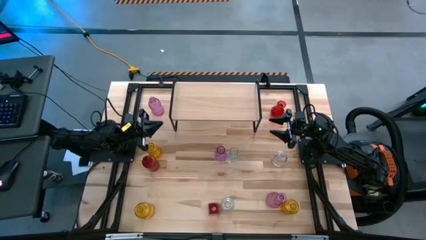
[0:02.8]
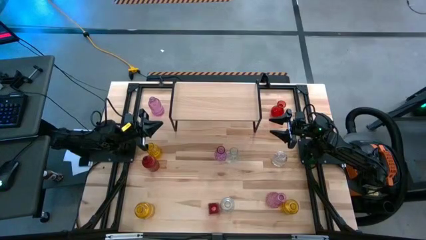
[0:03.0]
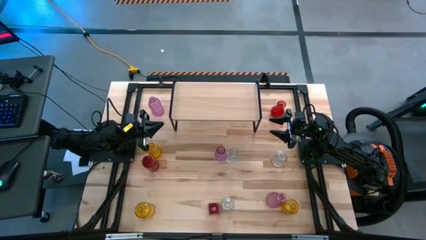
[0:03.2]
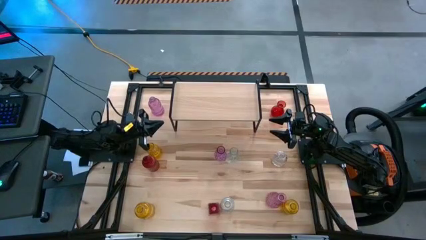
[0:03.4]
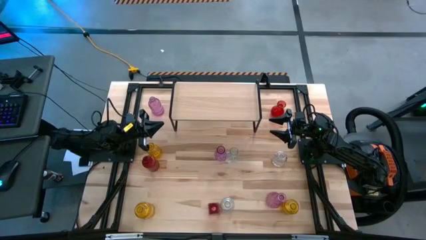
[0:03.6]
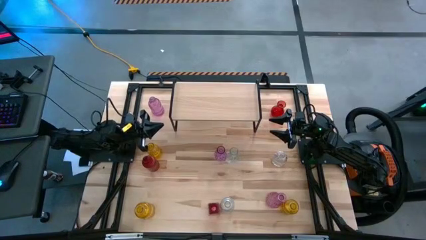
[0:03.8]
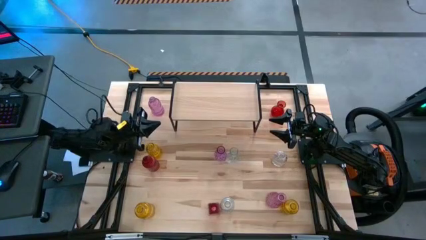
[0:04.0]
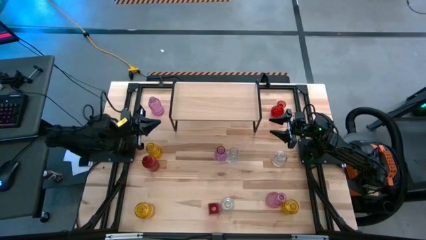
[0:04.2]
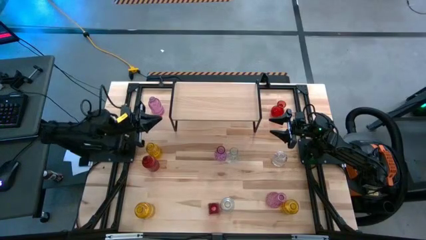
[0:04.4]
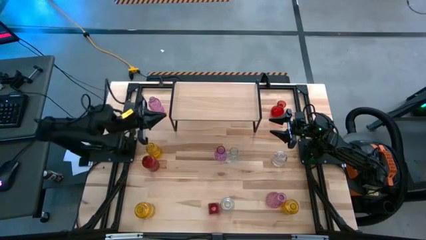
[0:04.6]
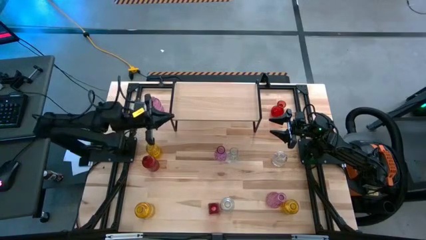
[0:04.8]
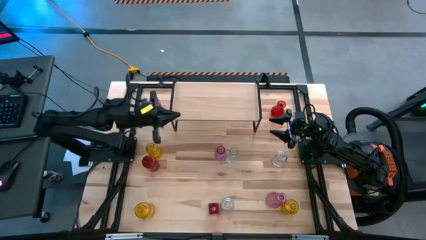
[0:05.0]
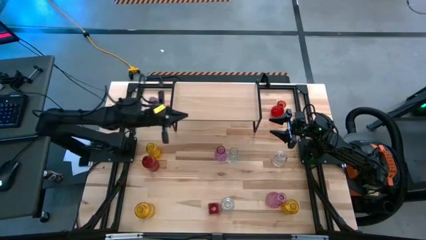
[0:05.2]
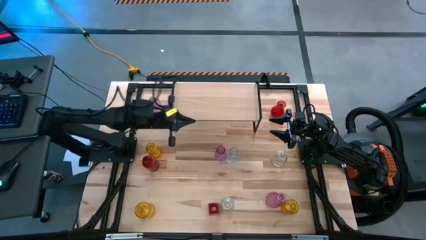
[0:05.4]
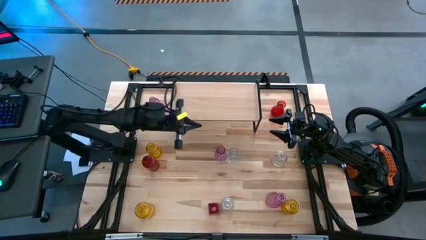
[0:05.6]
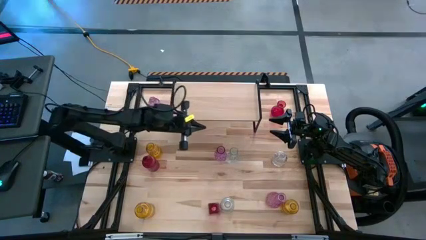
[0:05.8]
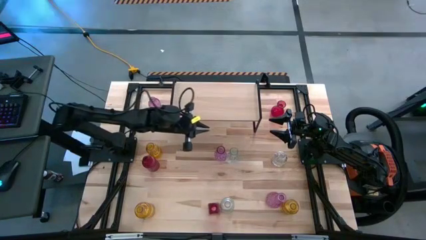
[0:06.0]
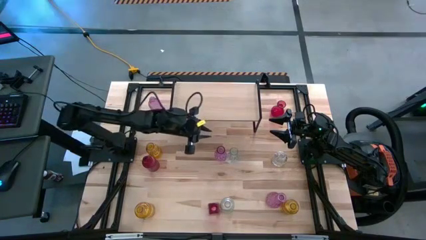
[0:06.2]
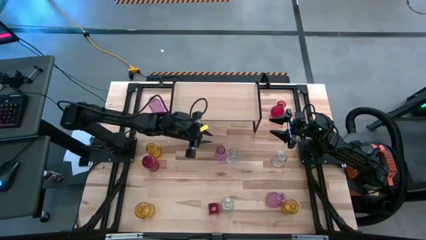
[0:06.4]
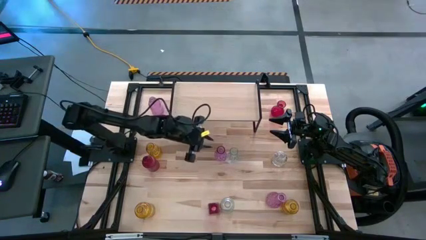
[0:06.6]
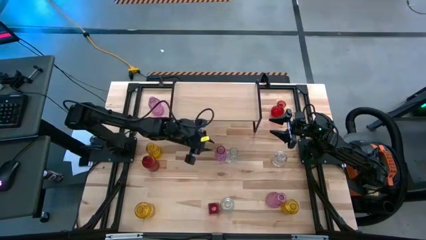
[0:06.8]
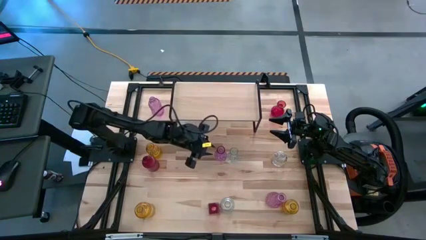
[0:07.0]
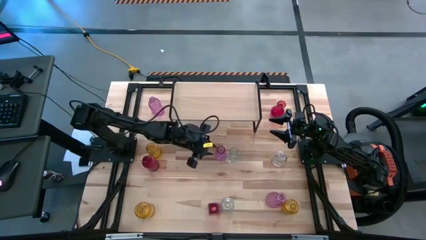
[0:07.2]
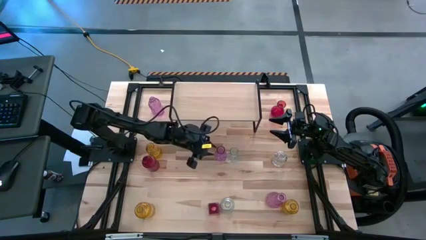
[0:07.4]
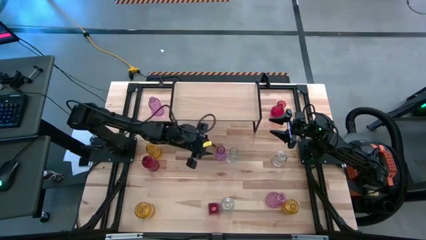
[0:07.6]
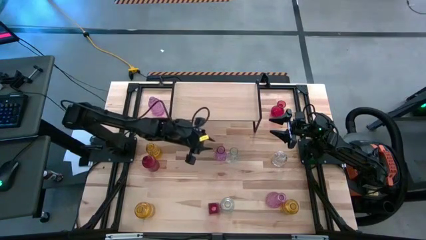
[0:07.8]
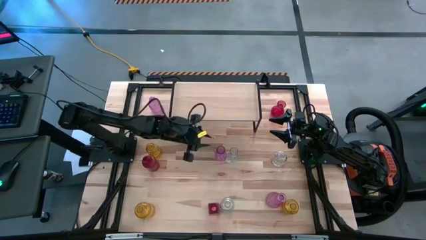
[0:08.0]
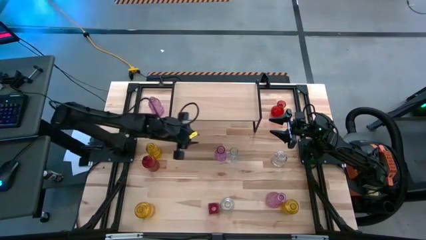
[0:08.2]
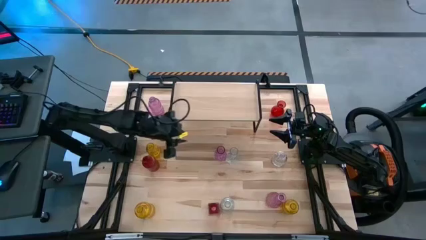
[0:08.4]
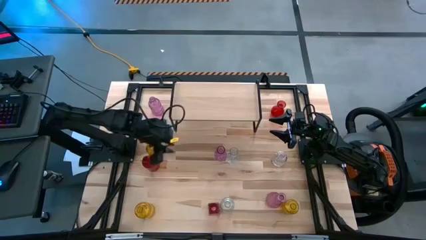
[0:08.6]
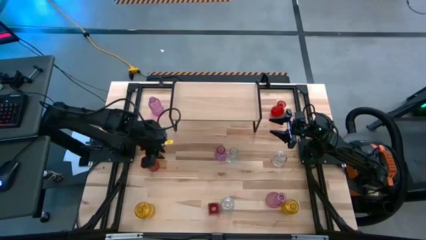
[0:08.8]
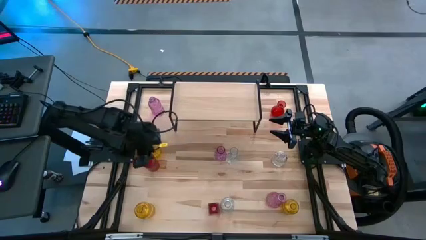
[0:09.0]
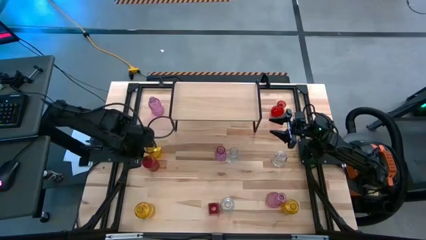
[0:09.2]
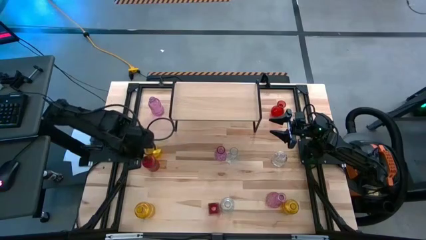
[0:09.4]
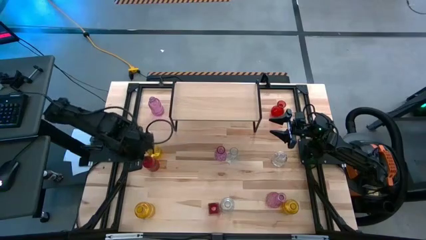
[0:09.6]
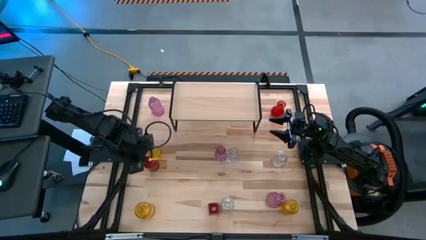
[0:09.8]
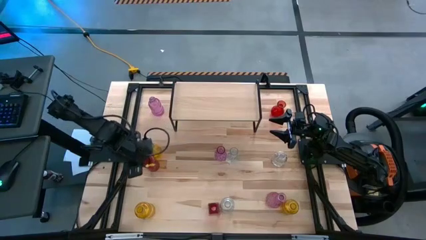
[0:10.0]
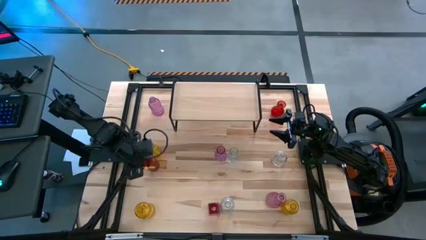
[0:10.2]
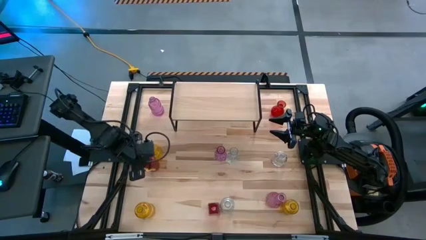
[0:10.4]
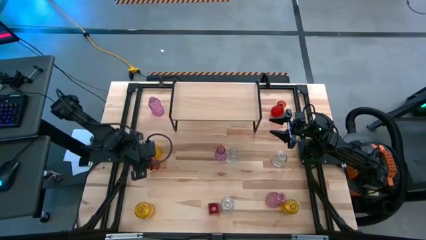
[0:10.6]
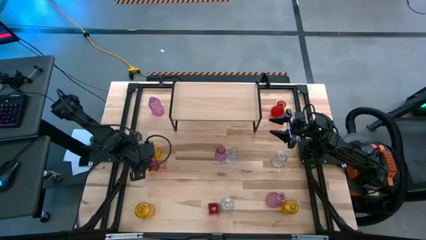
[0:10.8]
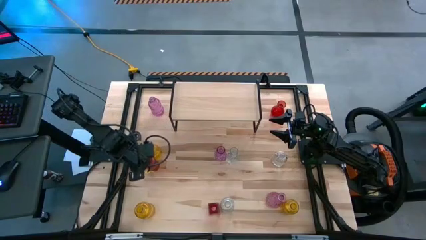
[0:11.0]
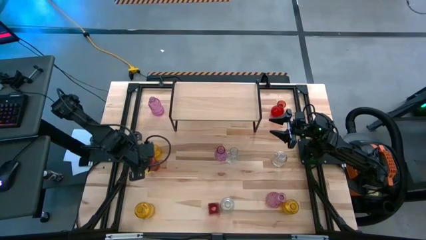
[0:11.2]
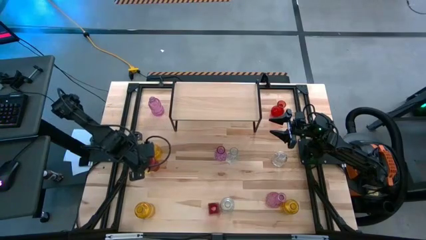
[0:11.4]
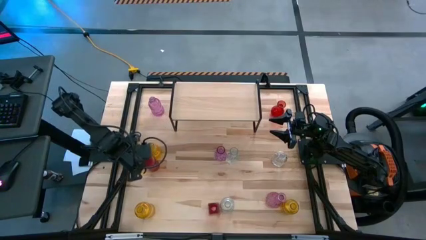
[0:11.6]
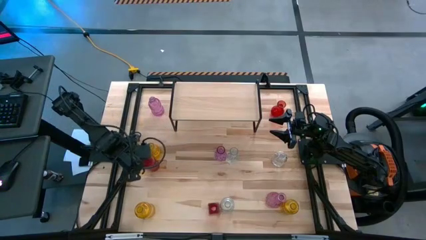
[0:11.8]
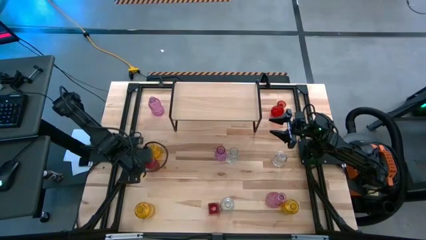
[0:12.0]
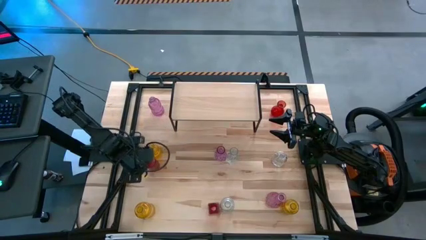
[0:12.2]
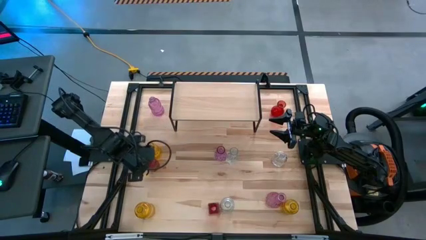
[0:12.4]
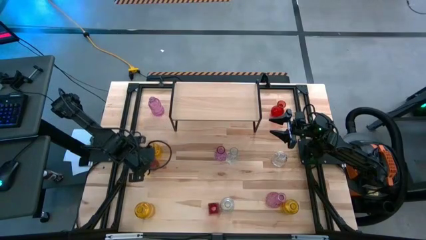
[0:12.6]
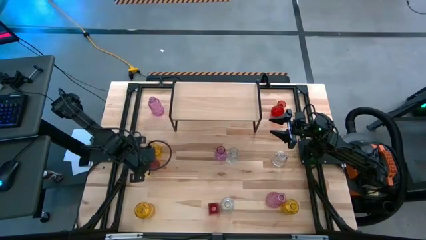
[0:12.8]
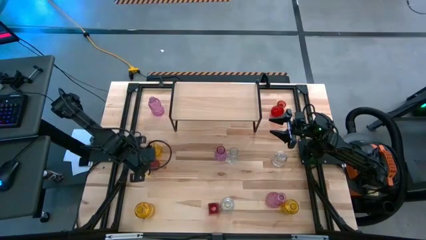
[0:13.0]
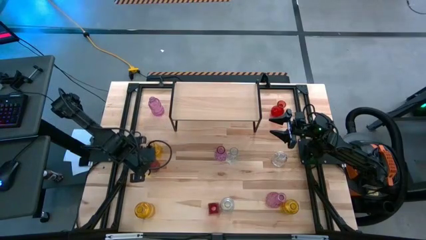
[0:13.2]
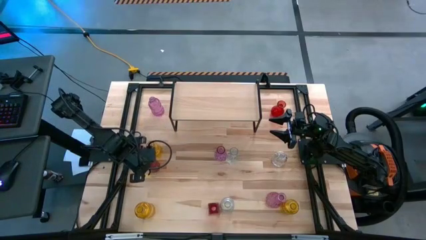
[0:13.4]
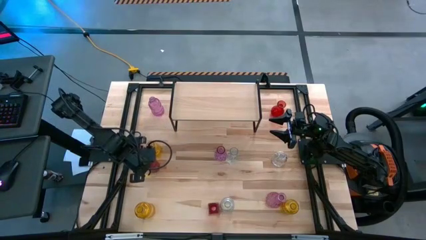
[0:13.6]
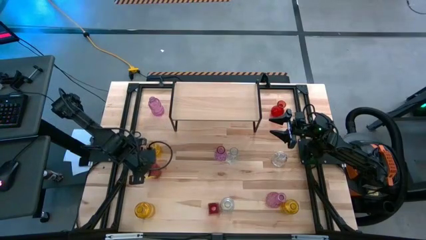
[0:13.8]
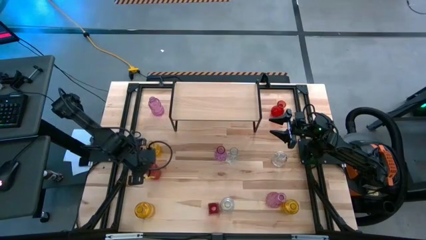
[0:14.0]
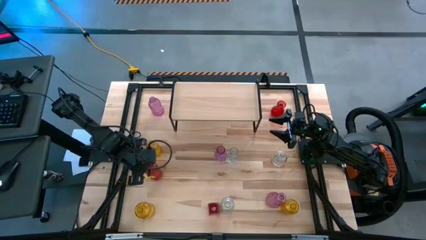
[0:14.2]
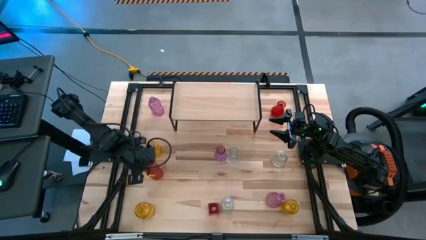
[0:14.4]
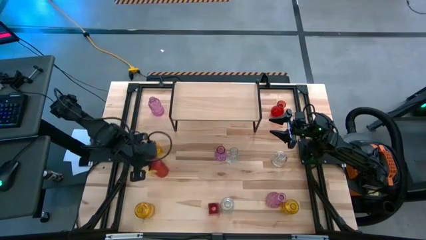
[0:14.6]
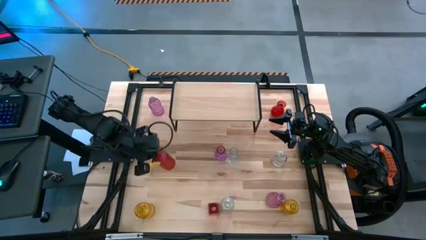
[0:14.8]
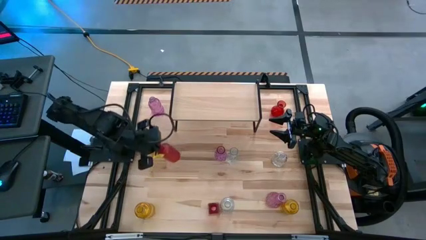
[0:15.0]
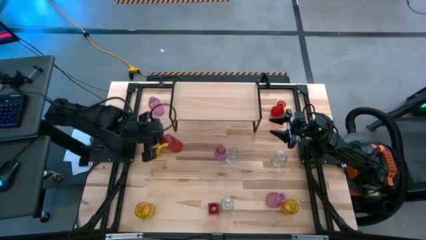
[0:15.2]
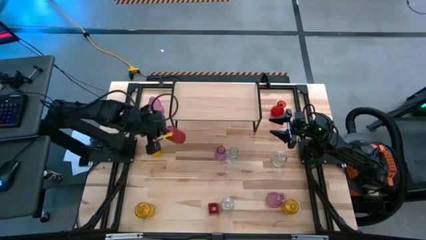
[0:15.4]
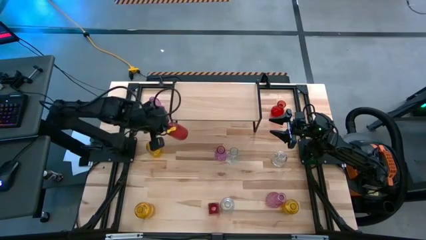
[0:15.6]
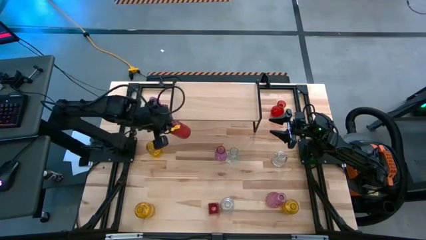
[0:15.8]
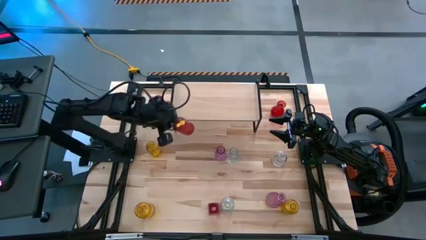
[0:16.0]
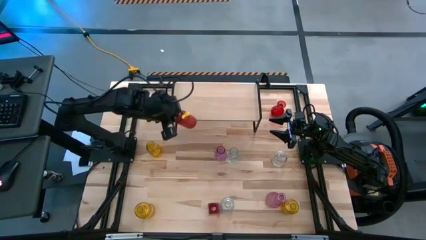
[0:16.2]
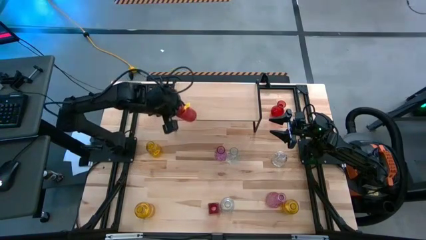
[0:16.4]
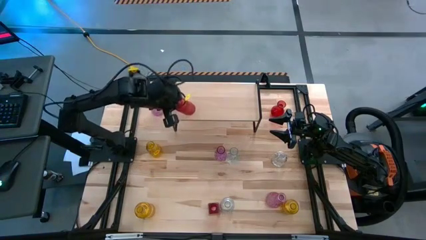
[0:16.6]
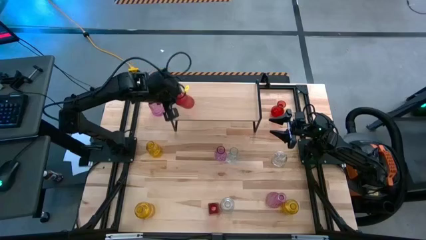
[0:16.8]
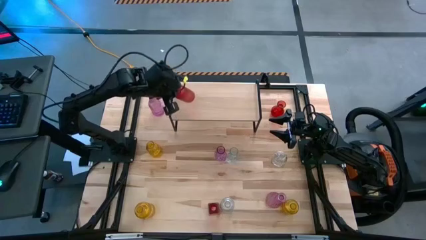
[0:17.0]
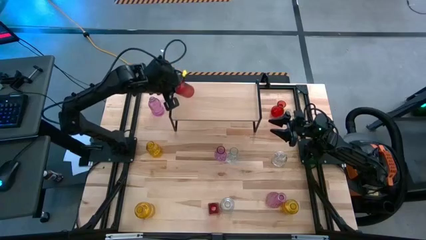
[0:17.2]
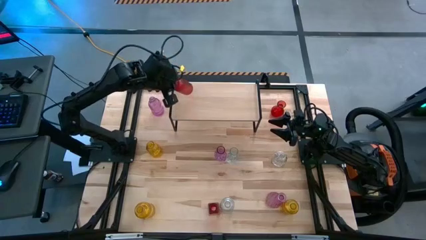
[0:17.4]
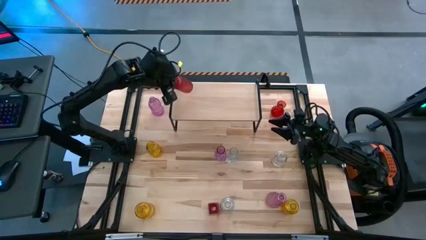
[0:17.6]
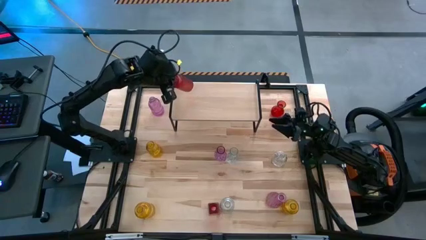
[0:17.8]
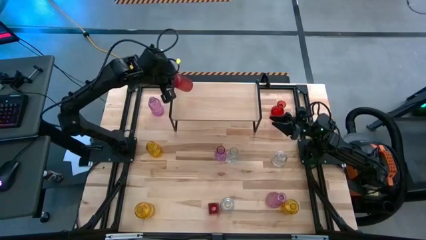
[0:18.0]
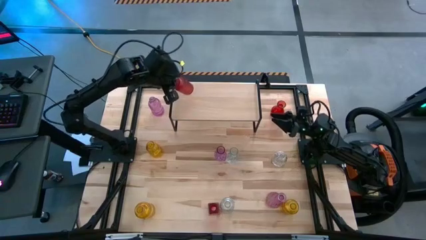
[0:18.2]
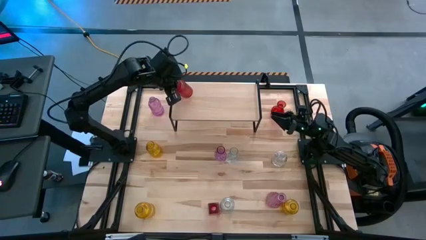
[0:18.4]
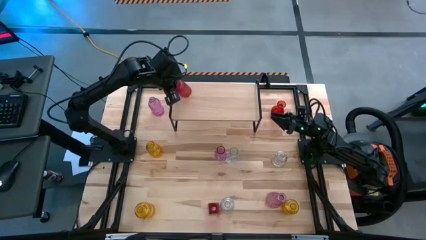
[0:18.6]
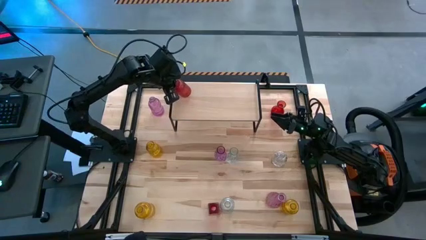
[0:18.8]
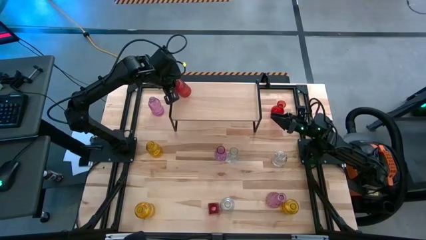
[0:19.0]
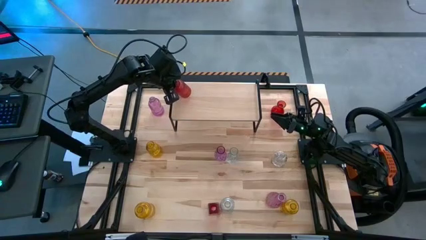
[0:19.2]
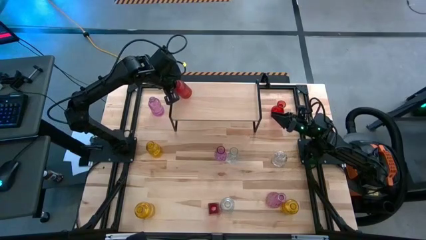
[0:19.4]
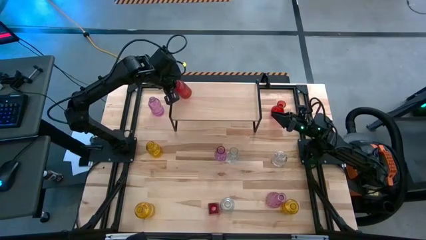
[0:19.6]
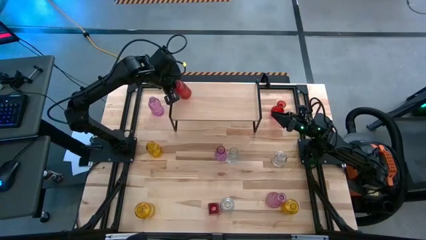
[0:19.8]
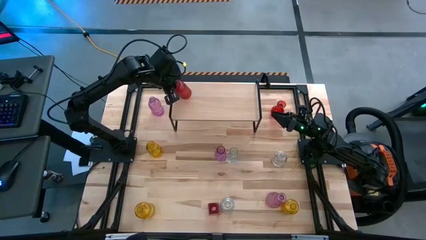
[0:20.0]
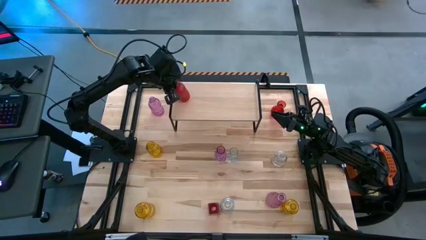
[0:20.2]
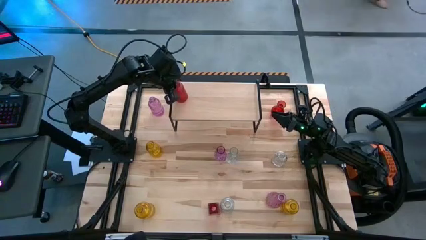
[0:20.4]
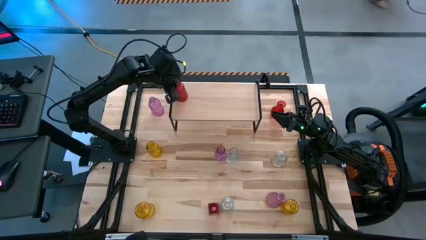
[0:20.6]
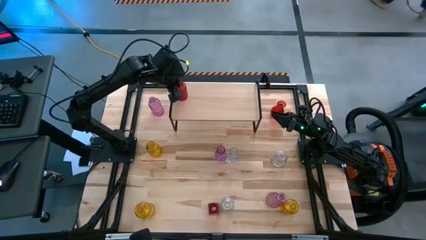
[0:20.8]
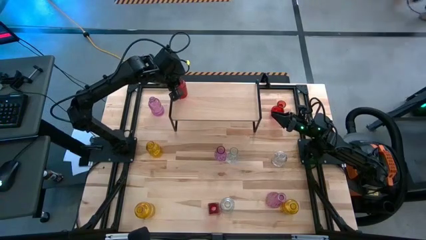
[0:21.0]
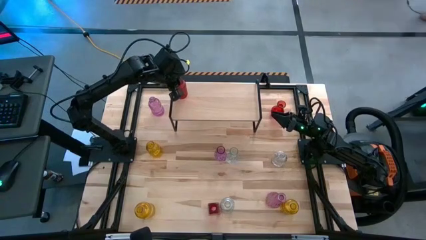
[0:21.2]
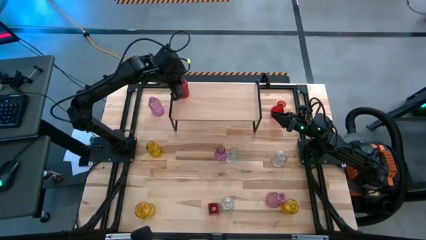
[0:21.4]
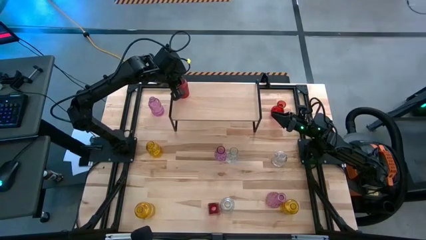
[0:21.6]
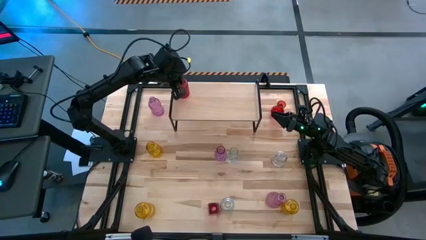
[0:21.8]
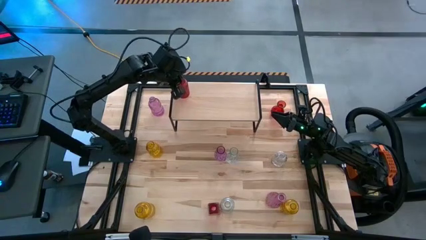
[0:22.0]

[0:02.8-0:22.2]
Task: sort vases onto shelf
Put the left red vase on the shelf
